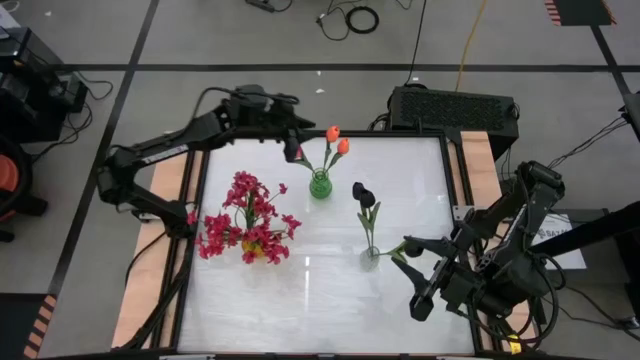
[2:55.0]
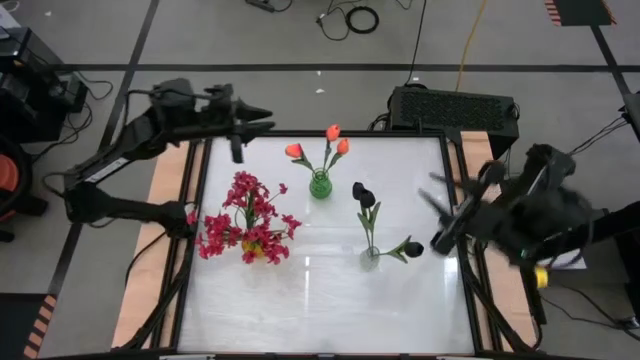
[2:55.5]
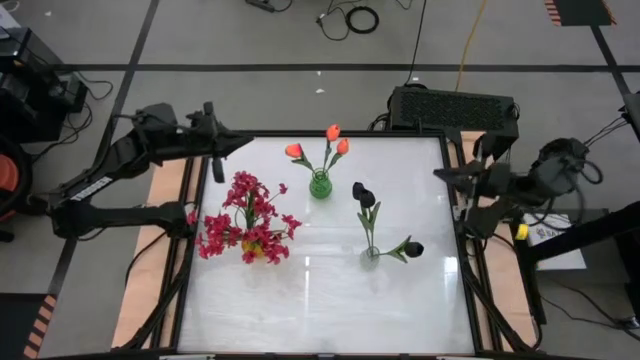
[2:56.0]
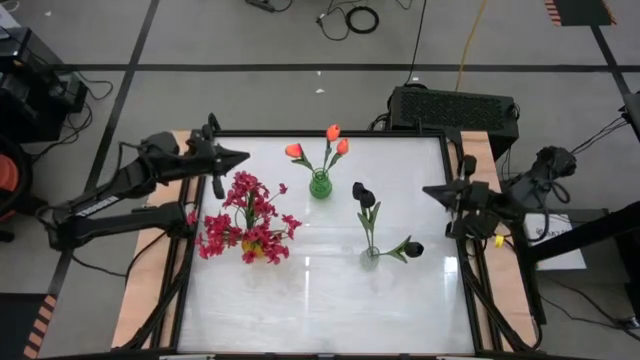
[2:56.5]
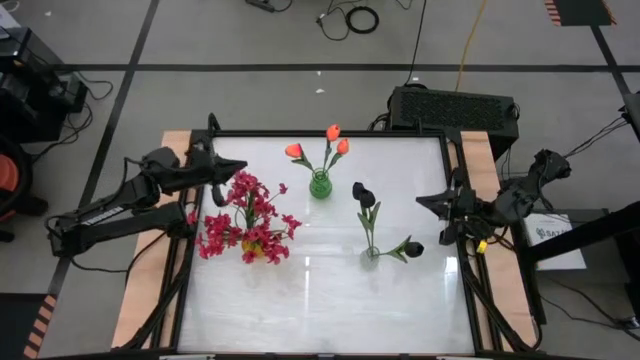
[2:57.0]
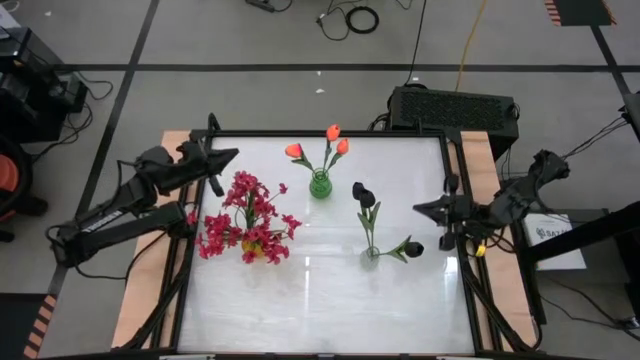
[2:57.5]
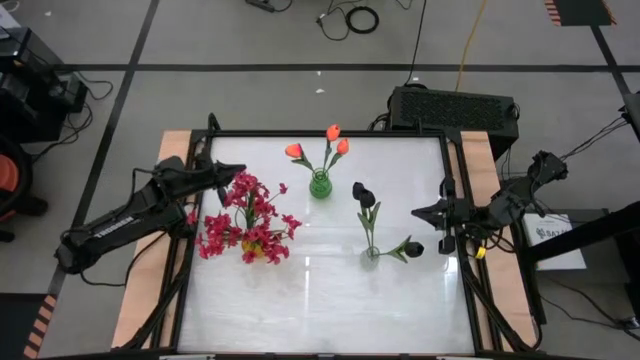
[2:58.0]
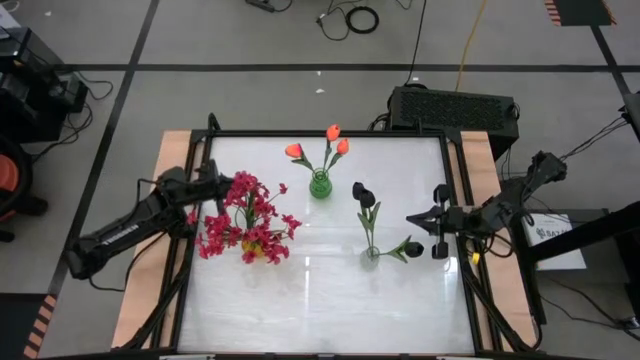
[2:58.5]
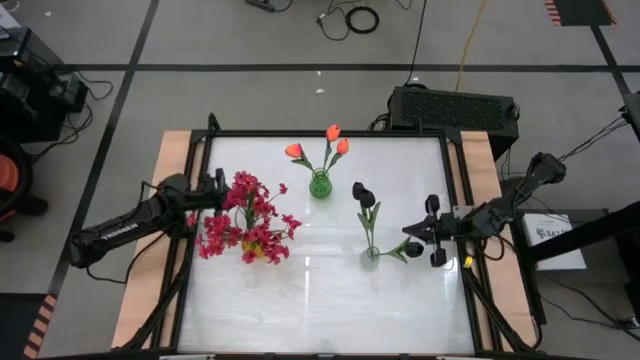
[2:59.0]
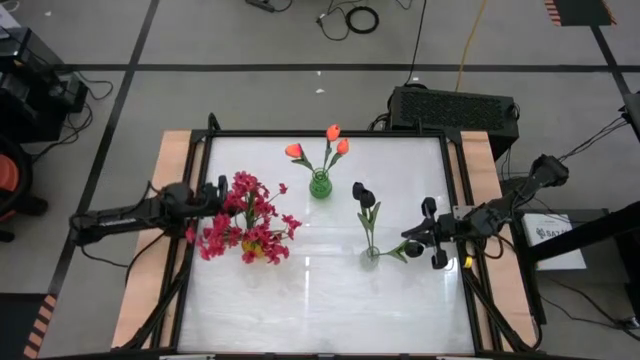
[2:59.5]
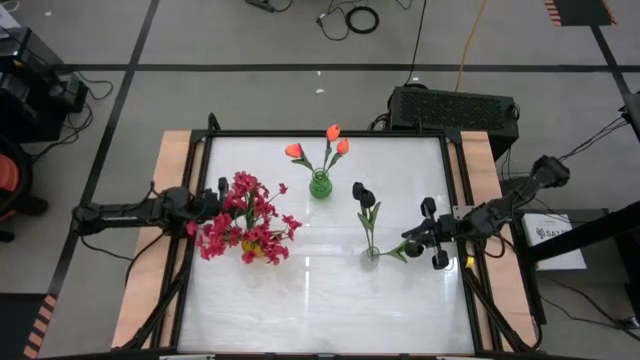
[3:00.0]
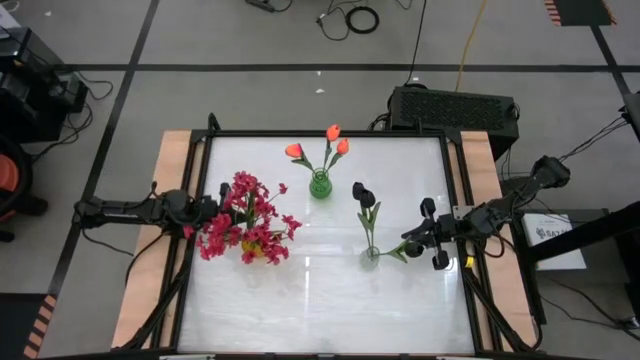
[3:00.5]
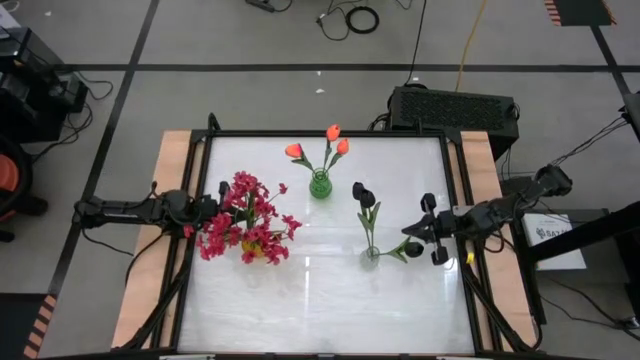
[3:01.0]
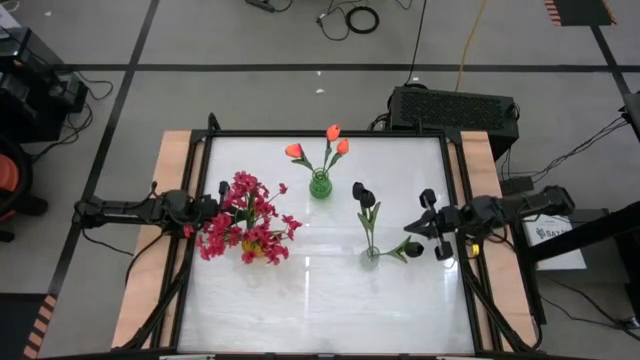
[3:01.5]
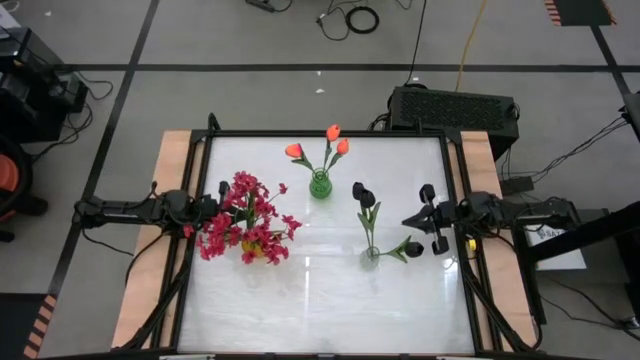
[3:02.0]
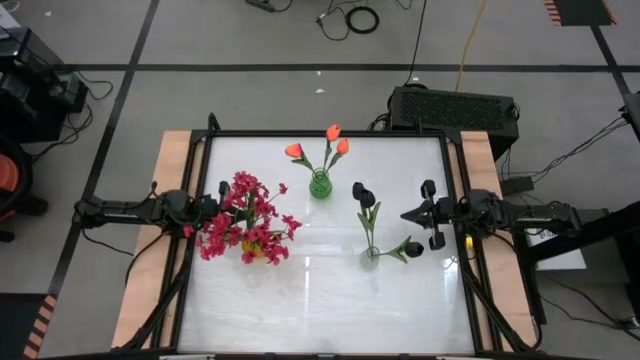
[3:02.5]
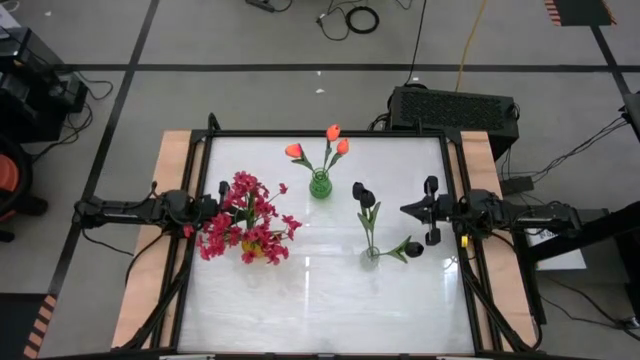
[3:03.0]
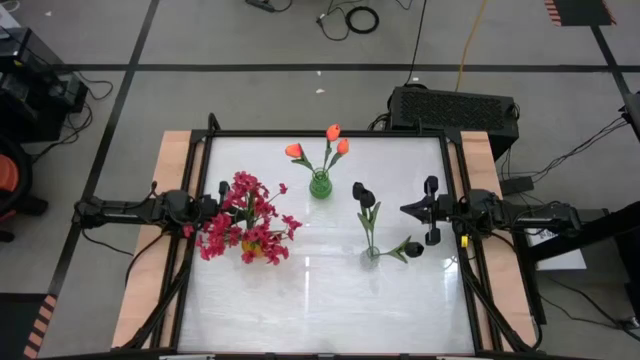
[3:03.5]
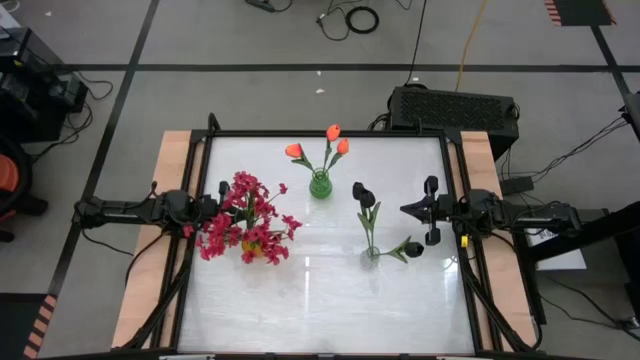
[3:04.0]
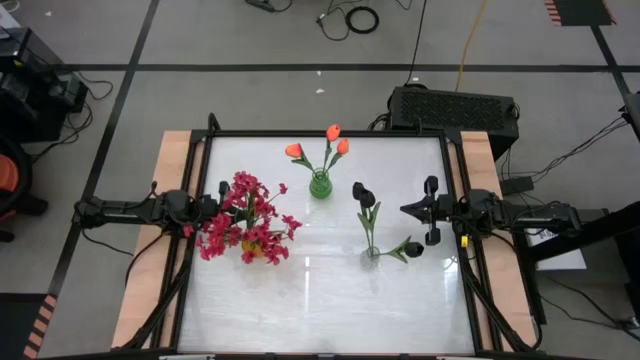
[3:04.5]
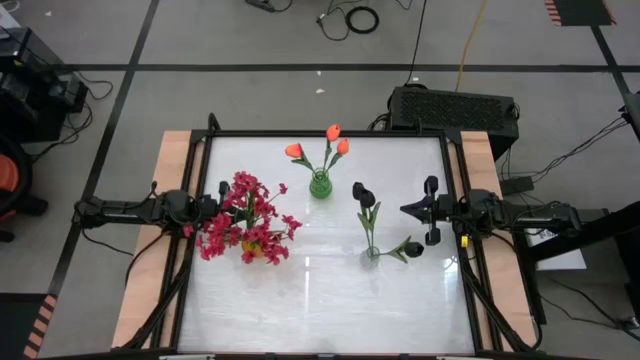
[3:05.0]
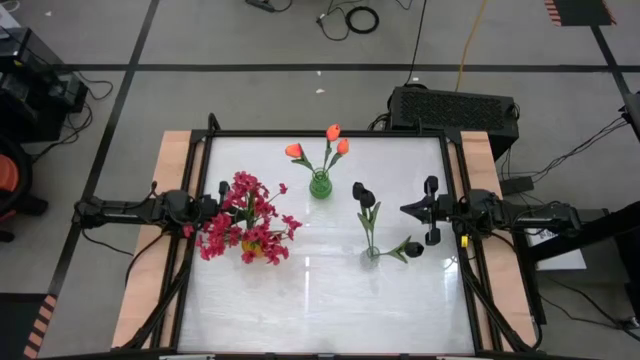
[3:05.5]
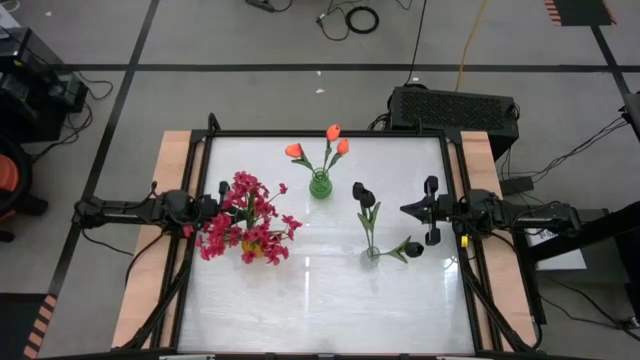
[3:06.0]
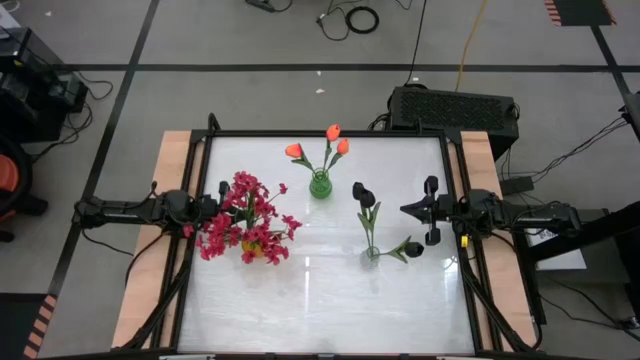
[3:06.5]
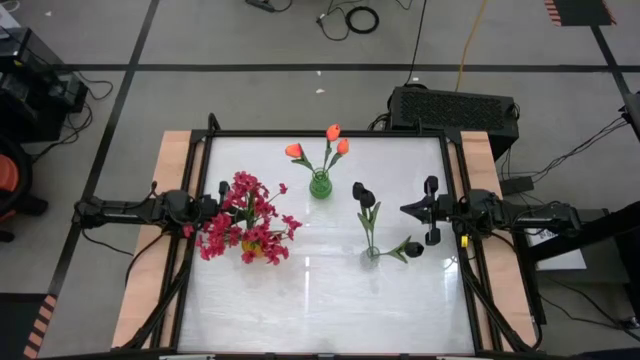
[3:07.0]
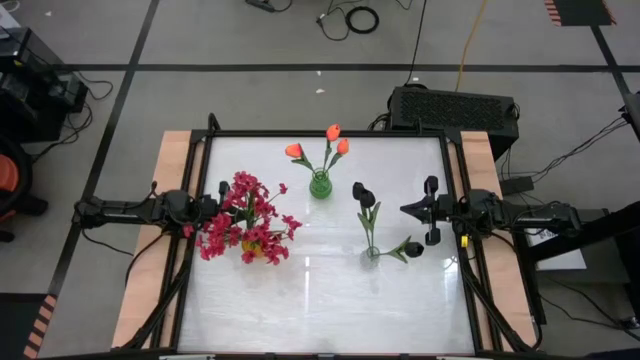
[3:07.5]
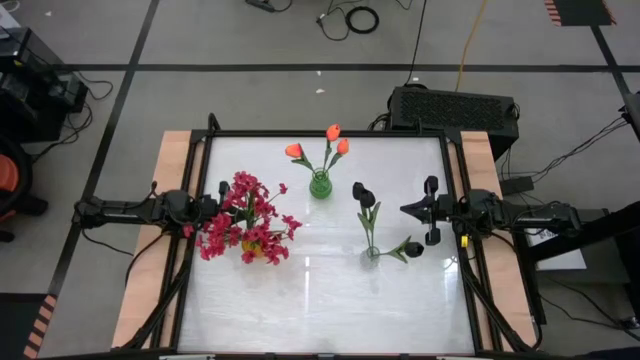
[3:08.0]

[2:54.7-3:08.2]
Task: Sort flowers into vase by color
Return to Home Position

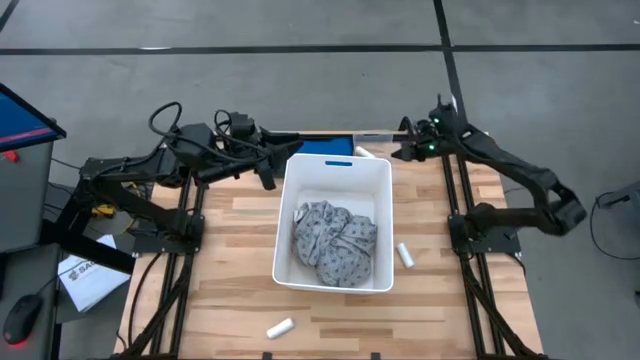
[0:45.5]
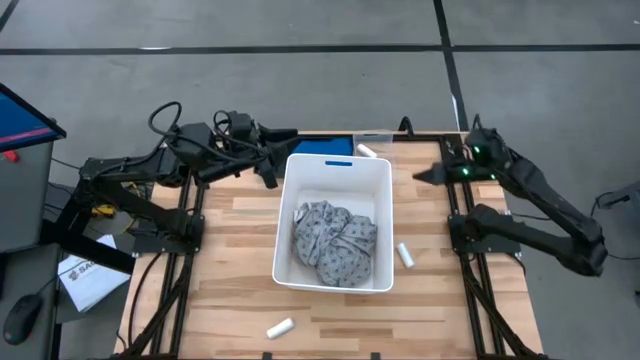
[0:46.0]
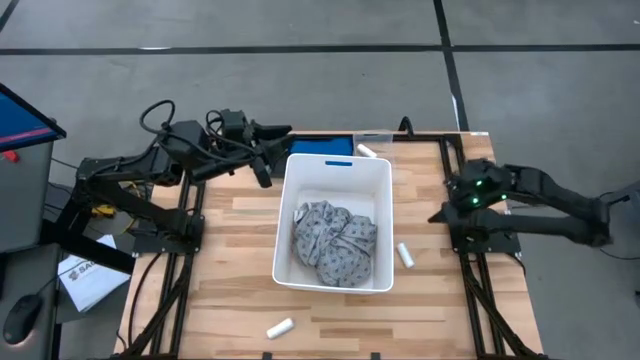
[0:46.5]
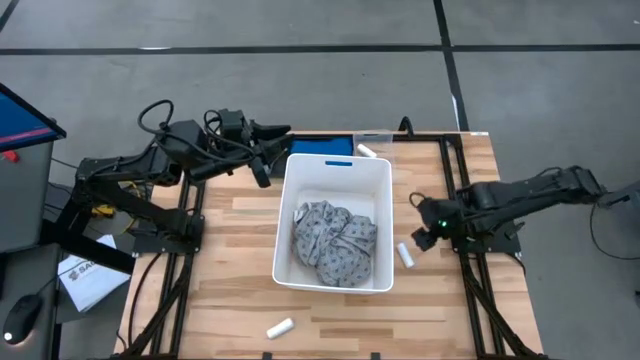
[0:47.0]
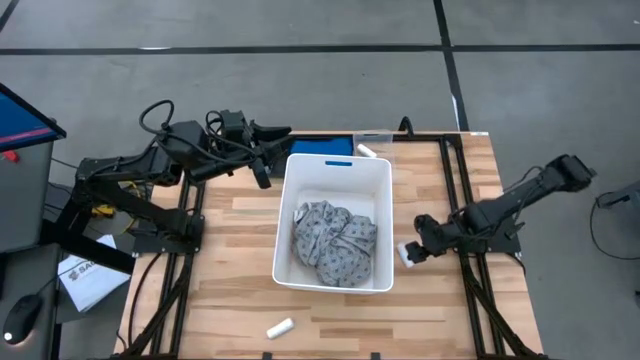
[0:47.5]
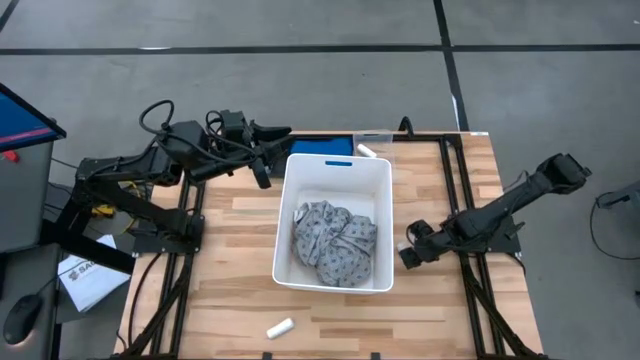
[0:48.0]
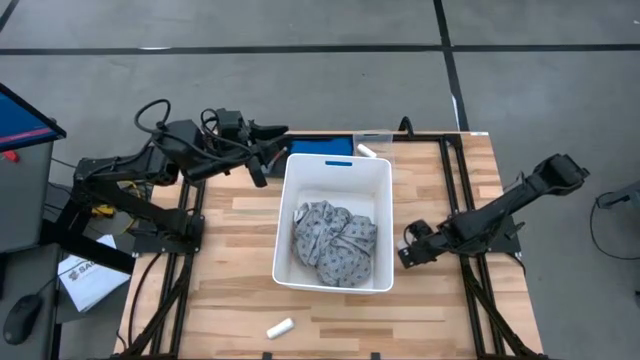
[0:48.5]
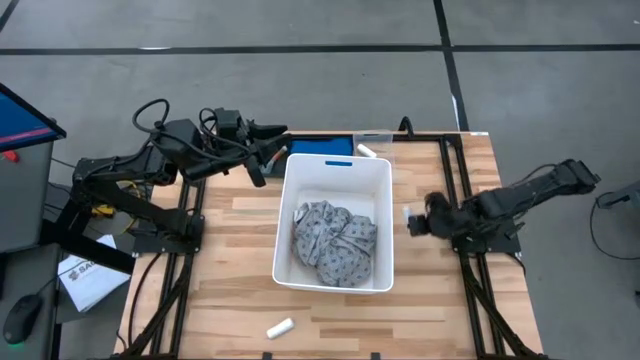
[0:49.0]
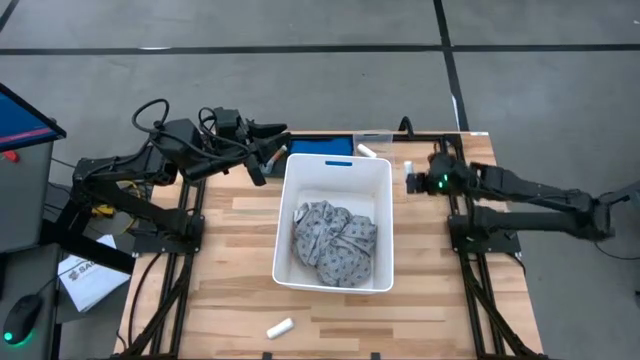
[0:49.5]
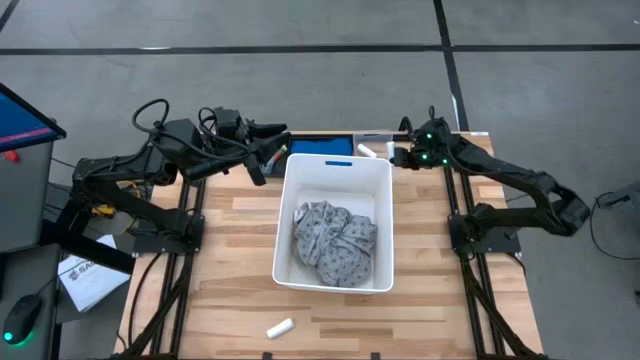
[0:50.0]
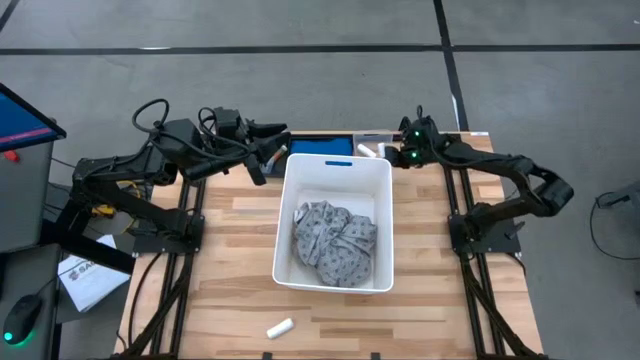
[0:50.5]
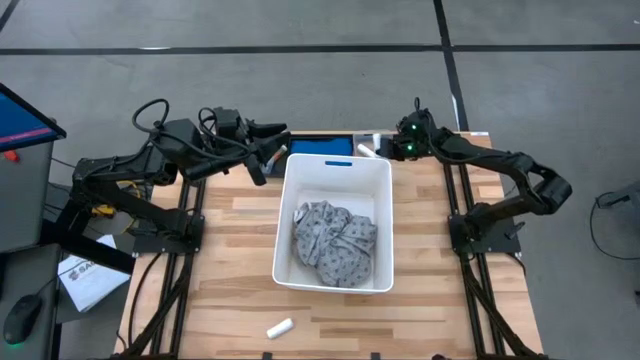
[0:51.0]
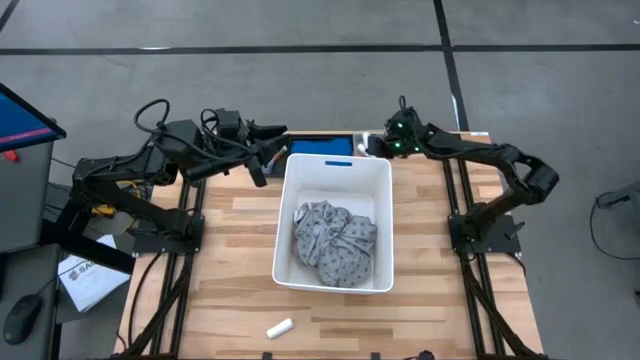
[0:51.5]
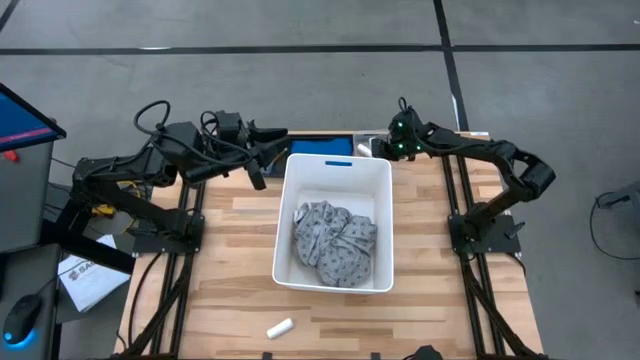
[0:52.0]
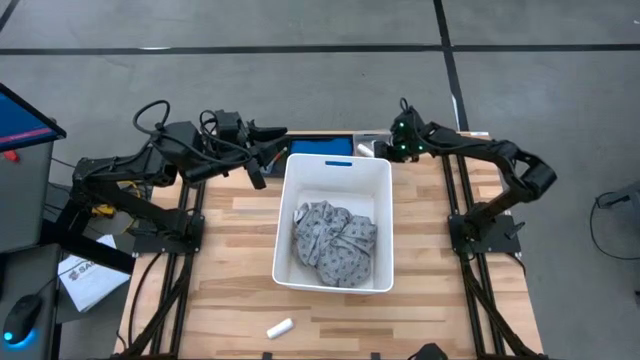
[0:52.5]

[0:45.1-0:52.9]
Task: Pick & place medical supplies in basket/bin
Put the top white bandage into the transparent bin

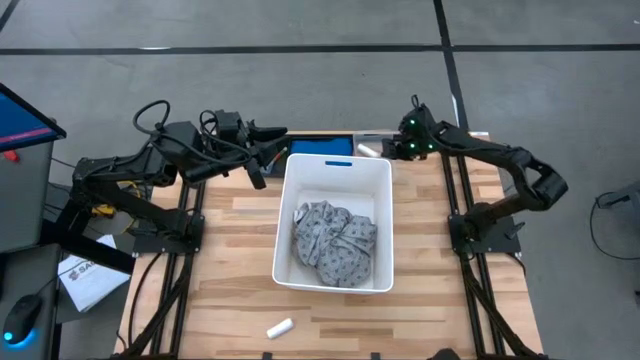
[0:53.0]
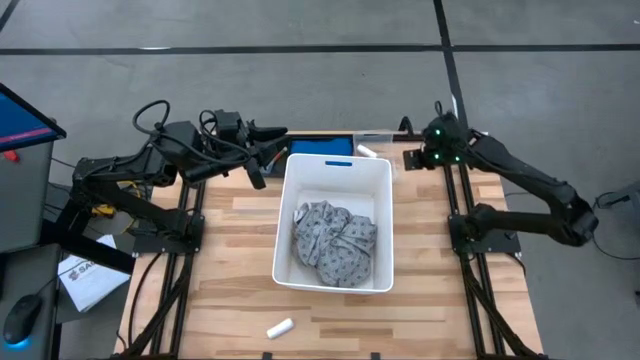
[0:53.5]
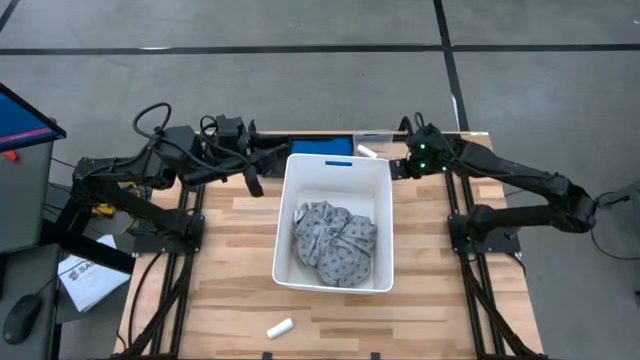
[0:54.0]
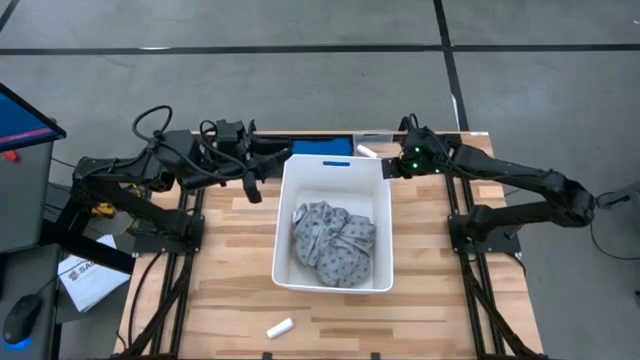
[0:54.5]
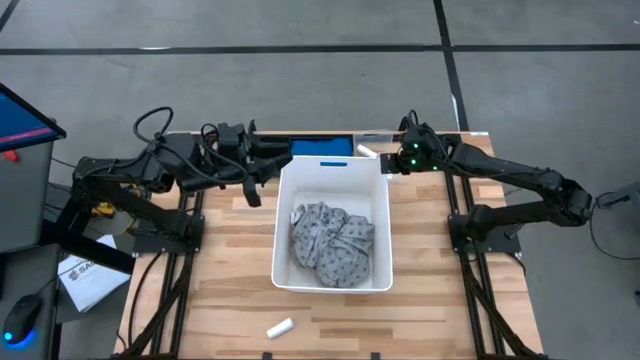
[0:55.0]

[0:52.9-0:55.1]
Adjust the white bin
